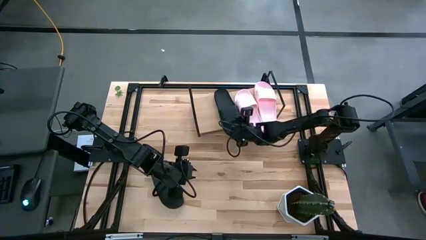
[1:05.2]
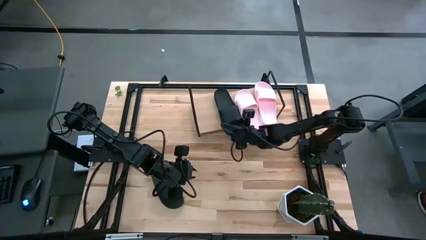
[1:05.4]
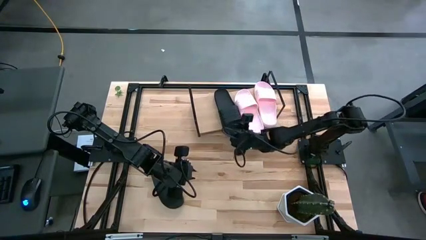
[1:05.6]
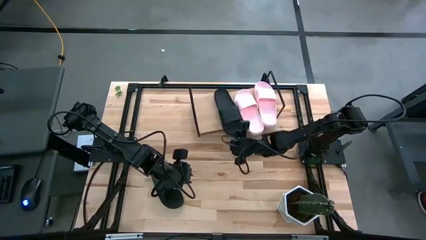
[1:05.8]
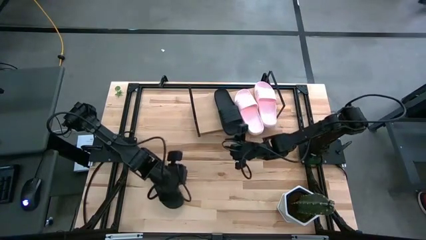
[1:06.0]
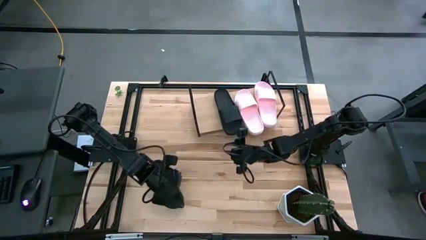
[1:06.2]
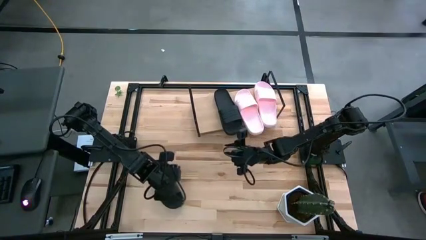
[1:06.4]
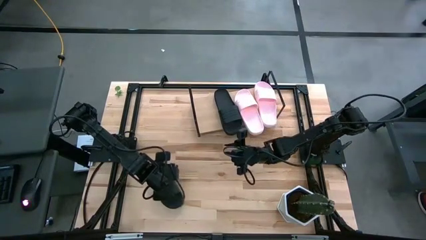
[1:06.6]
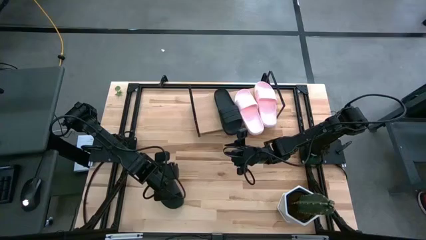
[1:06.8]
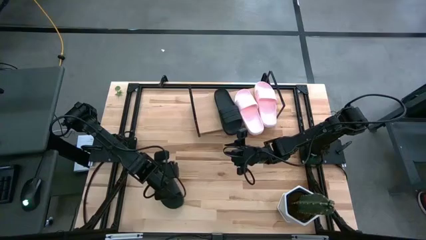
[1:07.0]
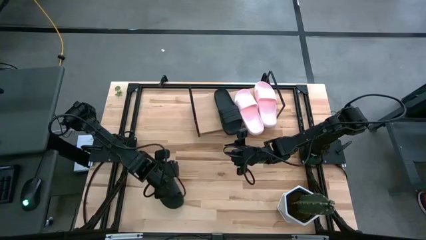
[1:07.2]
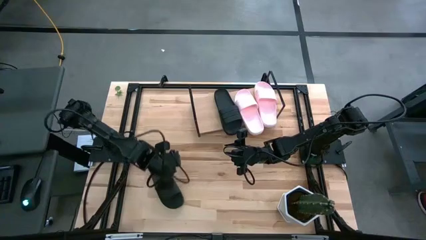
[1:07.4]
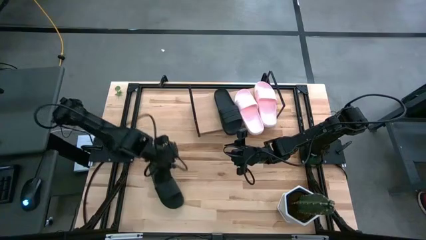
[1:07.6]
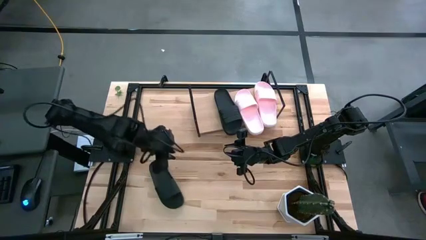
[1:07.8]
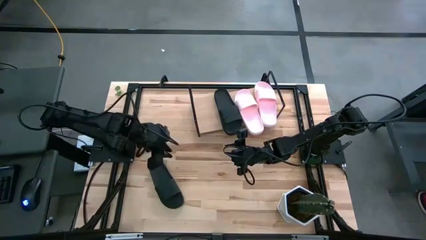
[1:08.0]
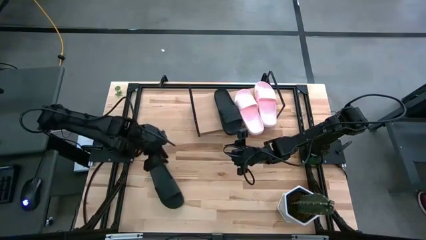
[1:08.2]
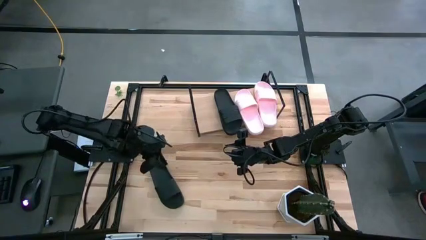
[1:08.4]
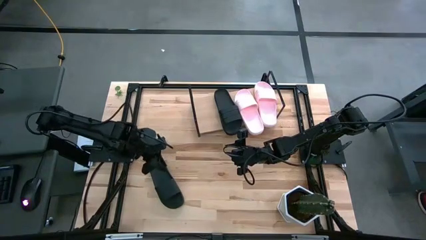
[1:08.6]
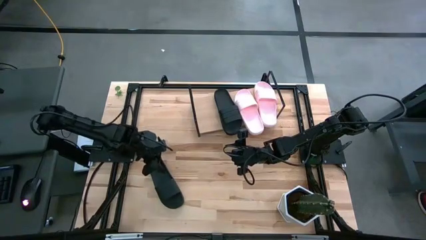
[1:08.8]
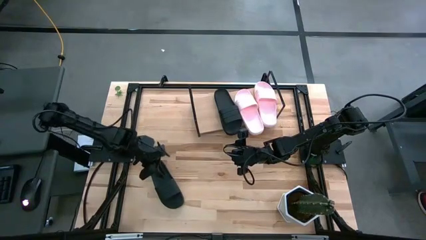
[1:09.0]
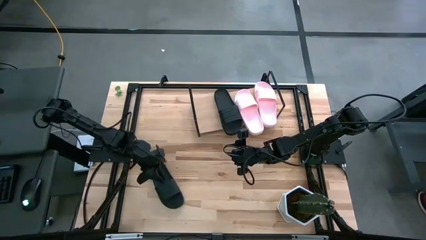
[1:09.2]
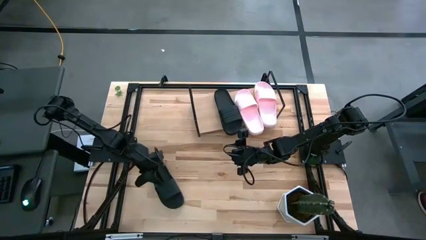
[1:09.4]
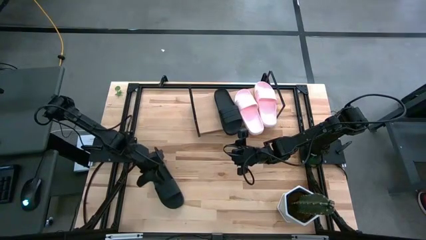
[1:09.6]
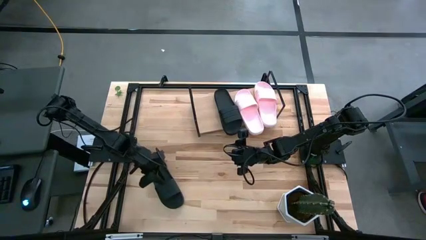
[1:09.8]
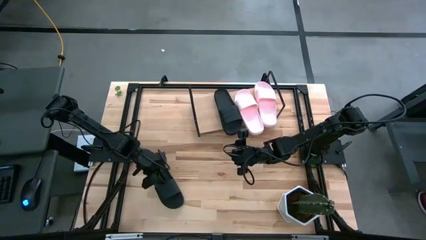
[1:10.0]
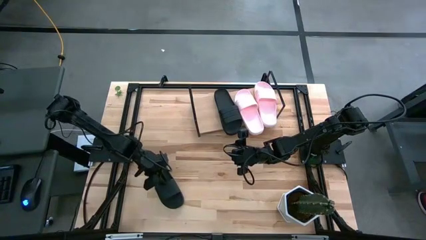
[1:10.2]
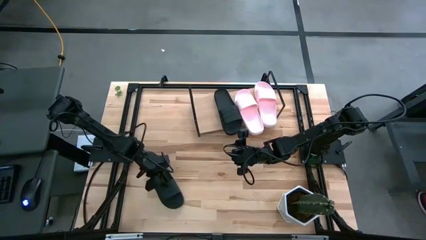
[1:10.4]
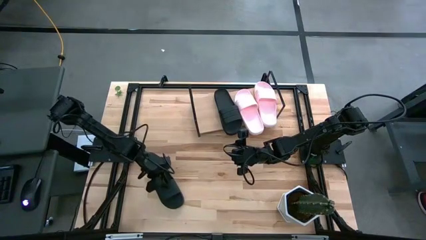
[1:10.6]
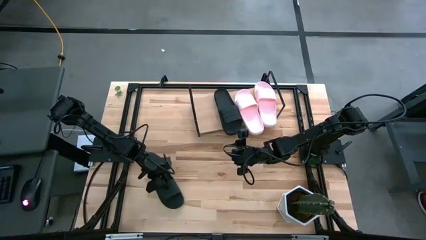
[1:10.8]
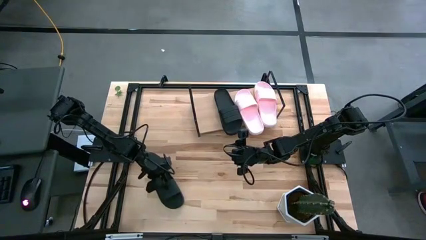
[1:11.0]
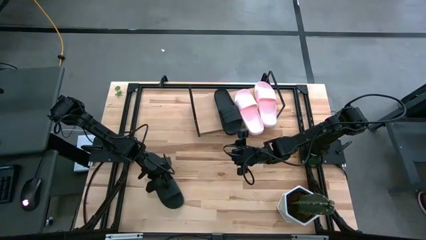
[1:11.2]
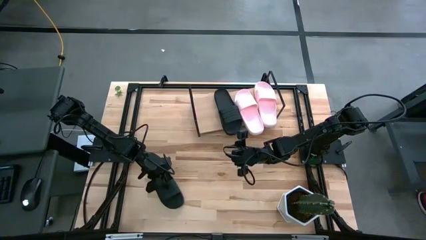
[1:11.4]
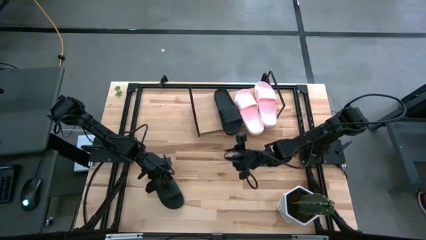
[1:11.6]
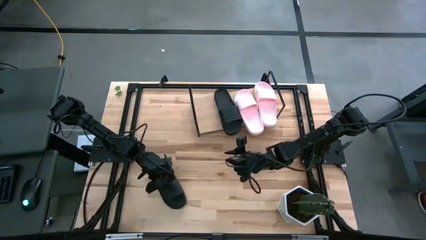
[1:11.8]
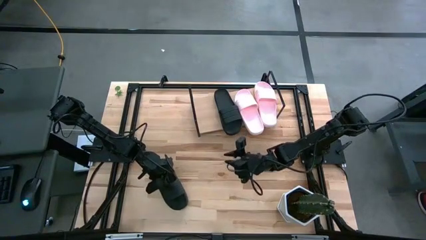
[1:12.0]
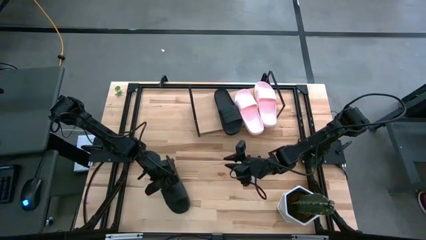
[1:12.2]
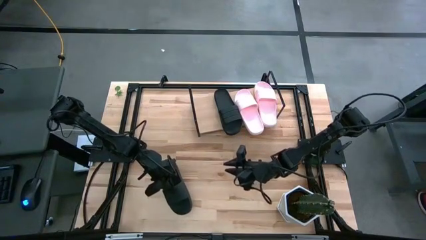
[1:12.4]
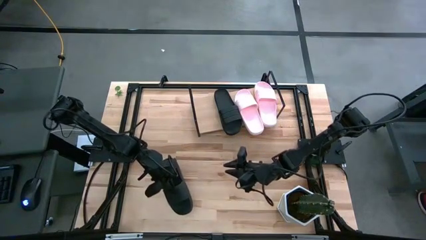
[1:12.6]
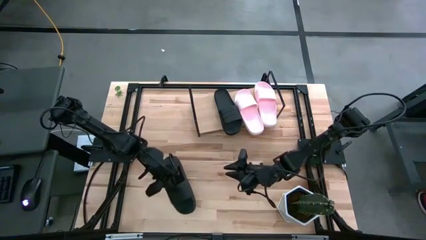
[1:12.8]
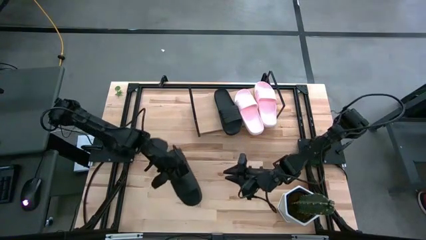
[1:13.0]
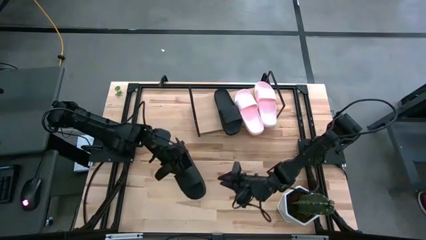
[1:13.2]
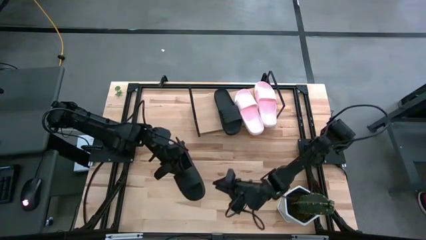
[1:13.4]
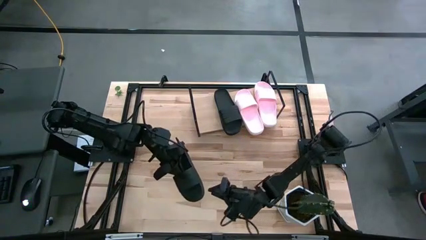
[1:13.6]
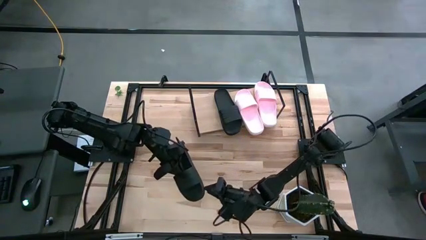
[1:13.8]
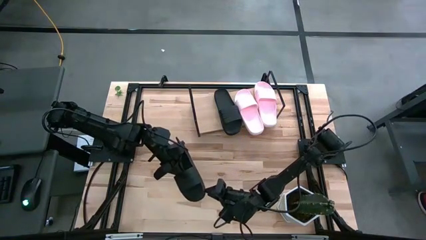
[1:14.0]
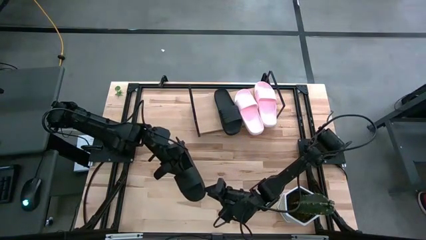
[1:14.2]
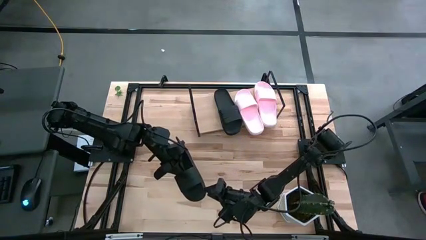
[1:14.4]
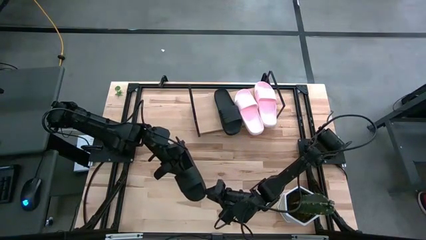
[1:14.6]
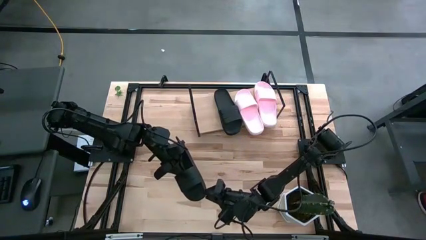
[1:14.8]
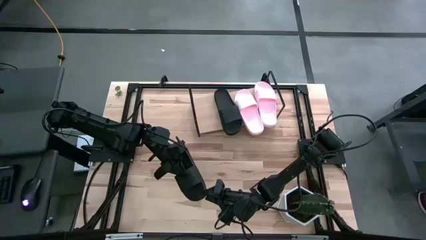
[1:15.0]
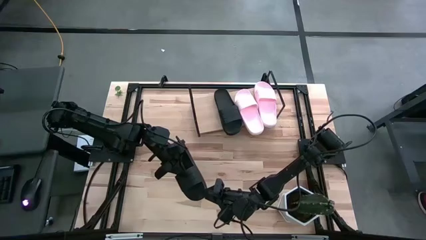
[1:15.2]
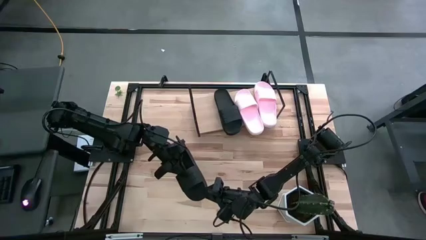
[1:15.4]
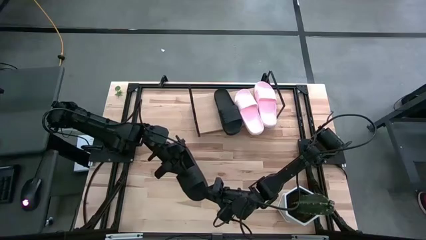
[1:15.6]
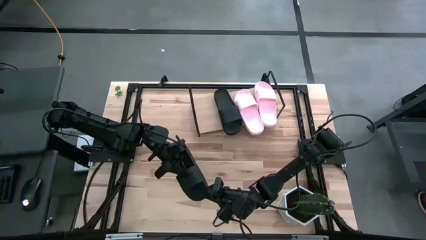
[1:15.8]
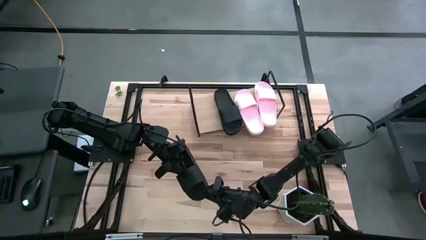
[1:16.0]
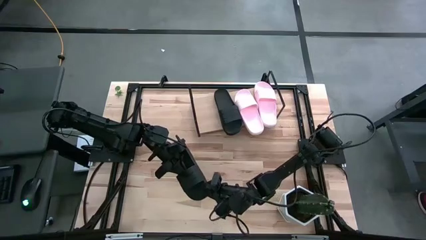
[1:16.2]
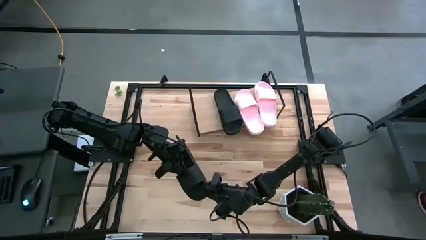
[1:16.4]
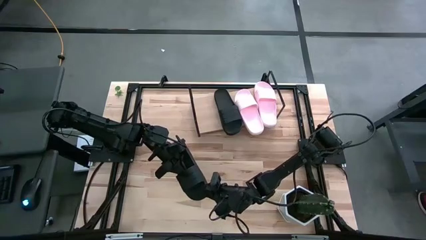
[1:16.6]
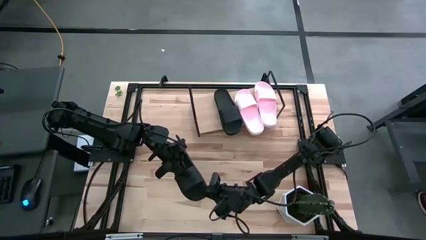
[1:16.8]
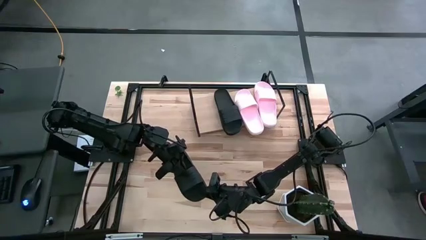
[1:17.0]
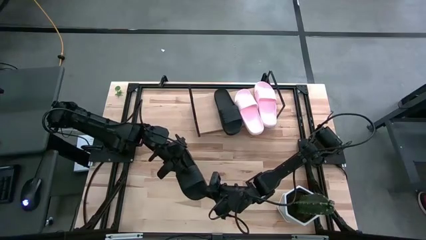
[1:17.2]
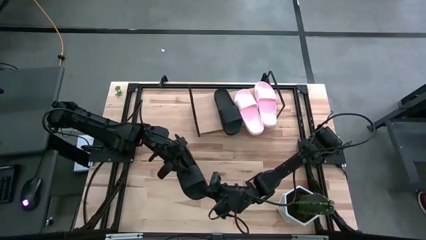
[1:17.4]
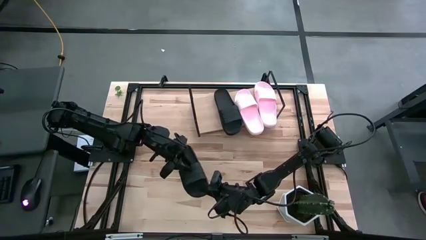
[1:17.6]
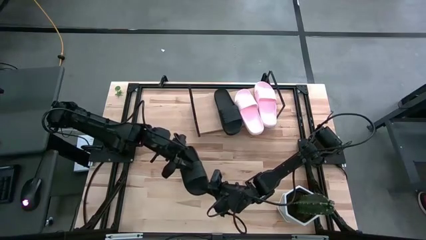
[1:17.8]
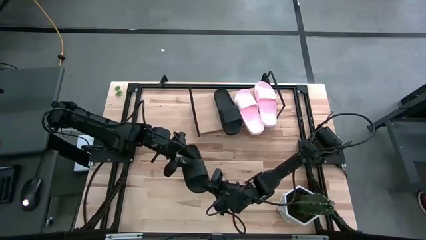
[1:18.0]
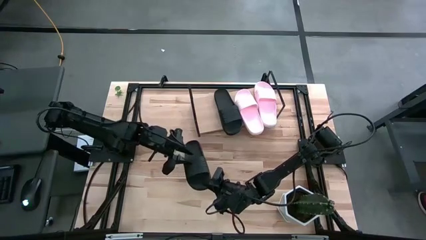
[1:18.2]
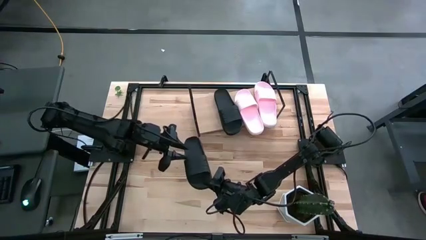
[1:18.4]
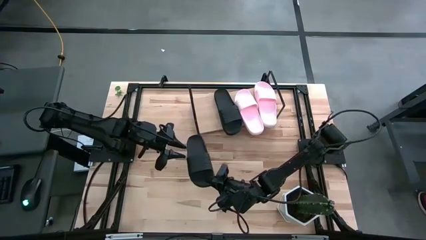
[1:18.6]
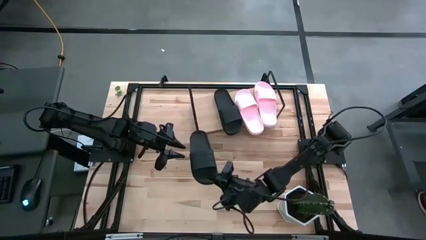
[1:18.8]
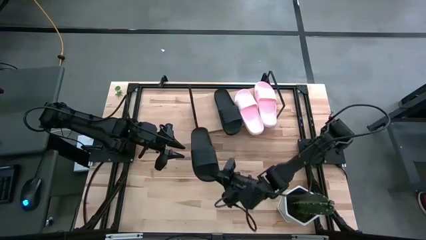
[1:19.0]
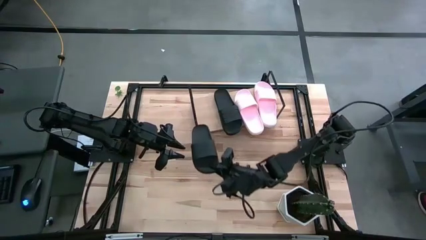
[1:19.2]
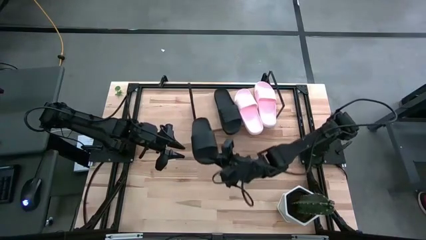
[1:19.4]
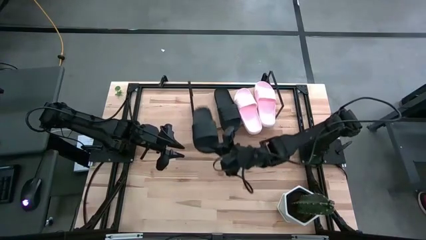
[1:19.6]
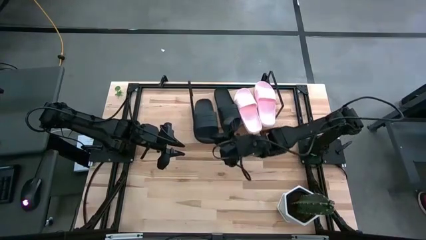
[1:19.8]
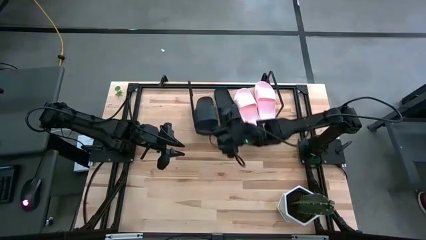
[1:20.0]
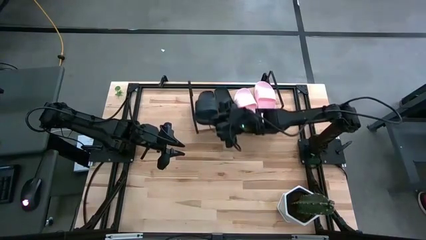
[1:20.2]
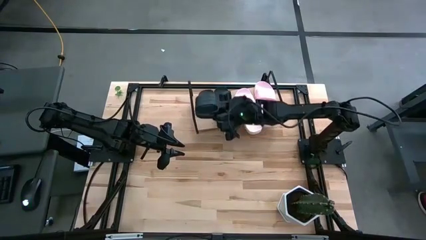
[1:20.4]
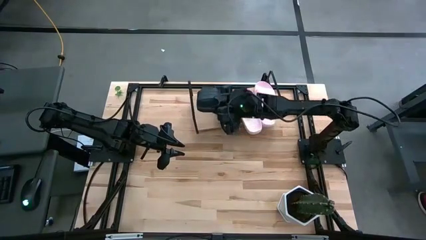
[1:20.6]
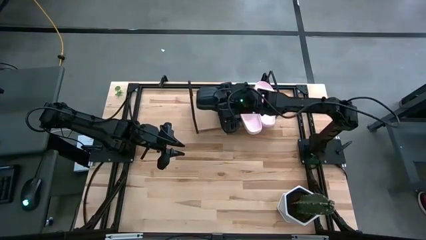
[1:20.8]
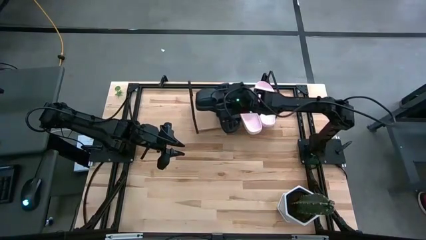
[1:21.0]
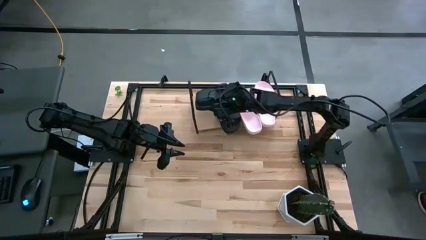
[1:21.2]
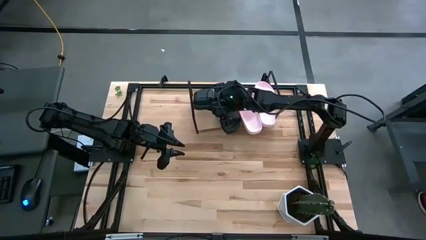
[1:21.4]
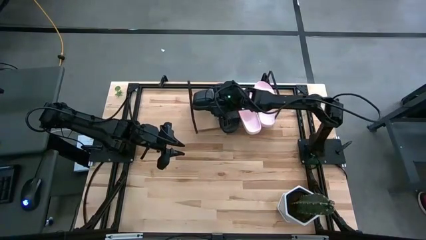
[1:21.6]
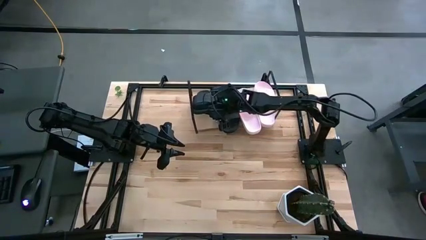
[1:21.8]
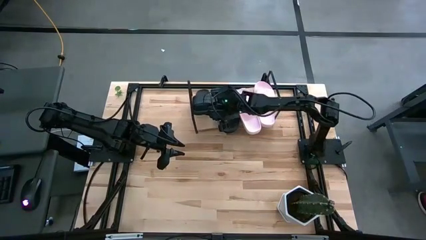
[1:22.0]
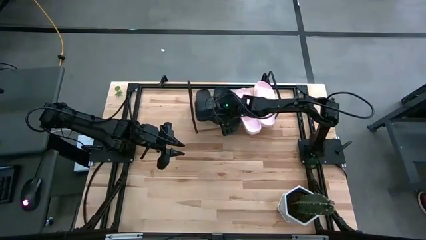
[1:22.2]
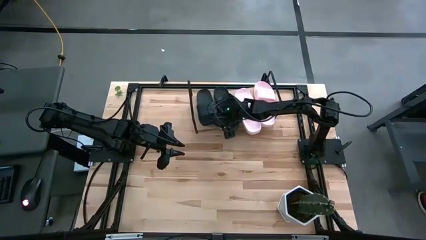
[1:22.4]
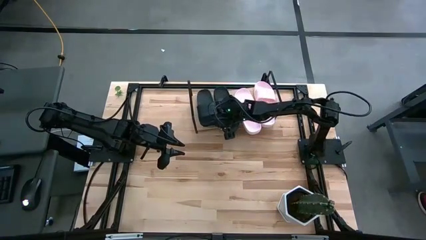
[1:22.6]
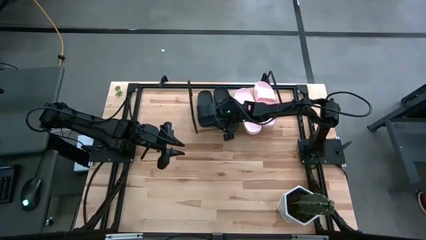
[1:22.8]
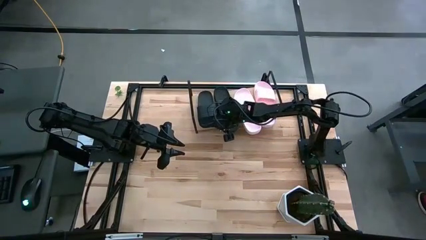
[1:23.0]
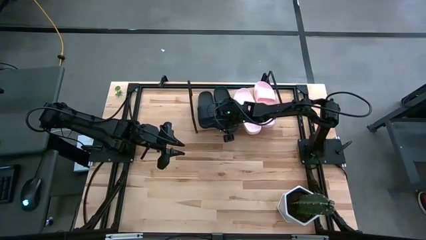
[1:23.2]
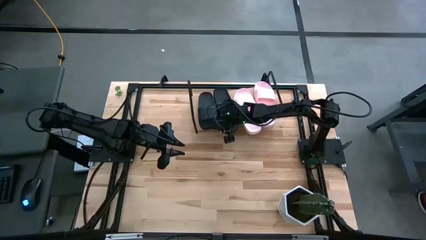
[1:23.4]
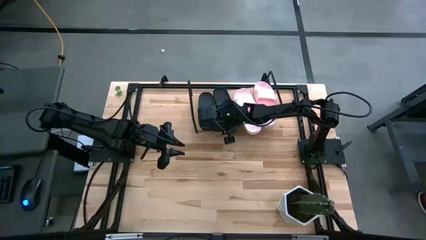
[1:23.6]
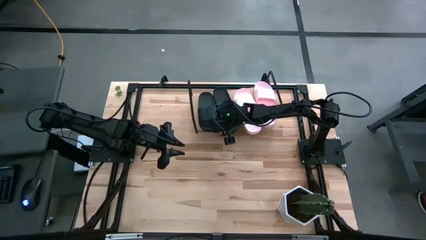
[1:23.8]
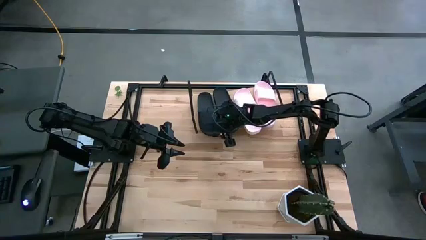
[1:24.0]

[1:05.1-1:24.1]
Task: Pick and place slides into the shelf
Put the black slide on the shelf
